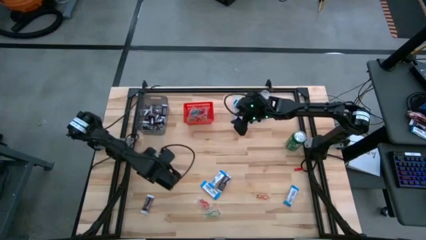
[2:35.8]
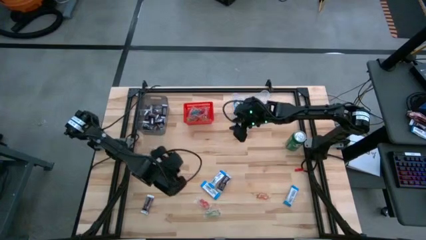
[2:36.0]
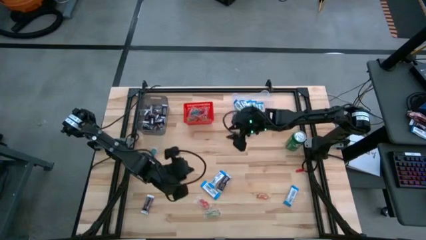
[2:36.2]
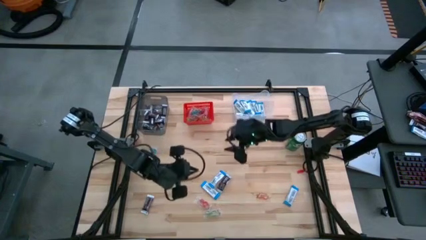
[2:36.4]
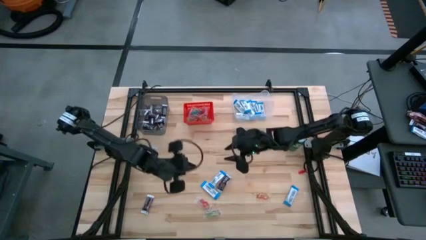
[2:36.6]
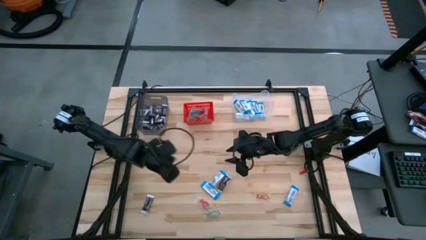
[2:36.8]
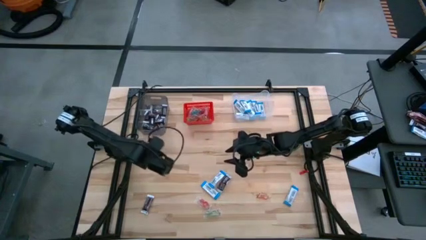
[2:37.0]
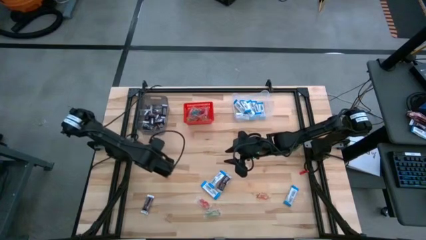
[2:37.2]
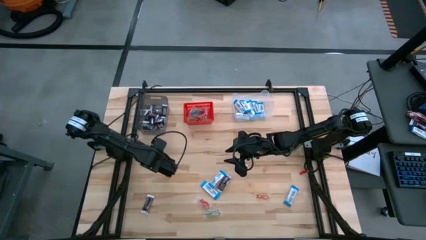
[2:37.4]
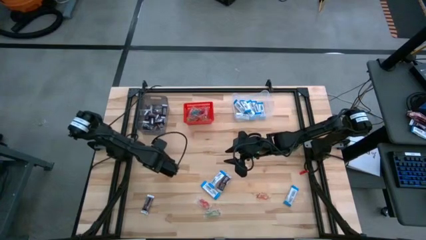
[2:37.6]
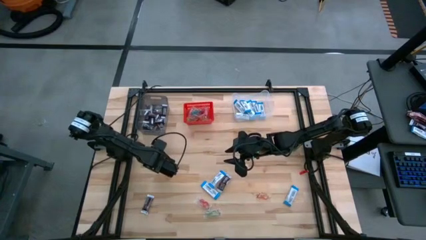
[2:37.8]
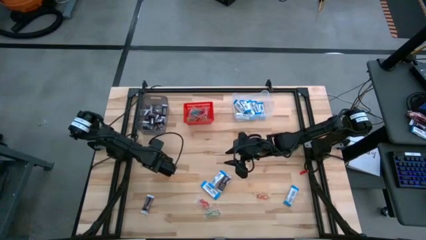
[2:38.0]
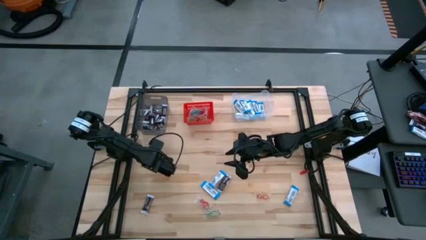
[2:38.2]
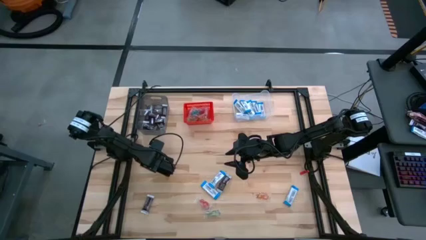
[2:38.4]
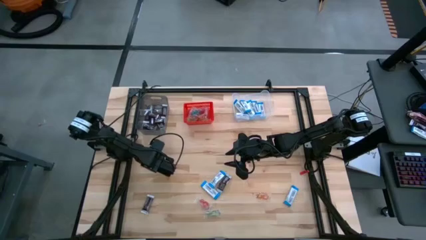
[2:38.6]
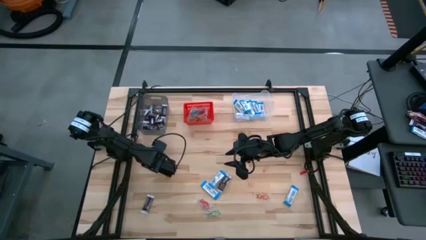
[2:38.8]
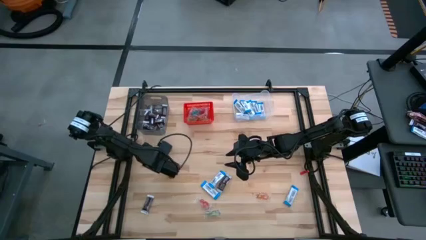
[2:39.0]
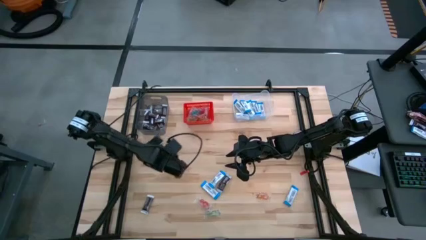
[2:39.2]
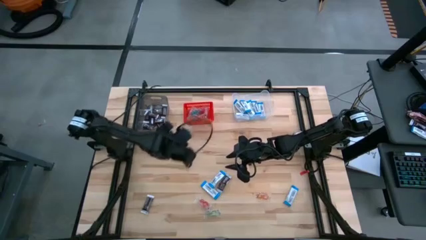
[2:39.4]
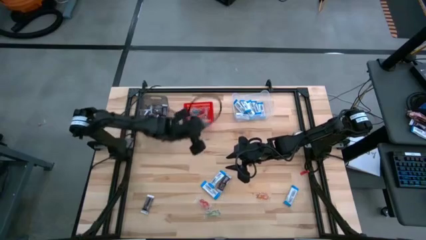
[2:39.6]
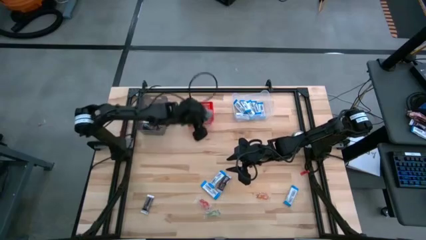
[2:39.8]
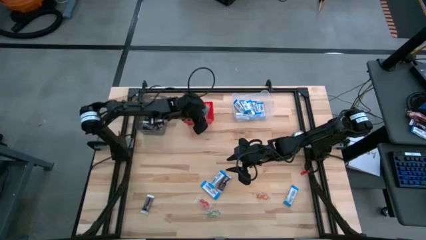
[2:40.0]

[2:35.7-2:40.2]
Task: Sort candy
Put the blue gummy into the red bin

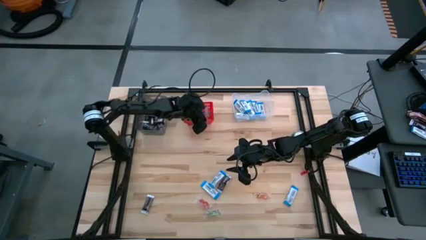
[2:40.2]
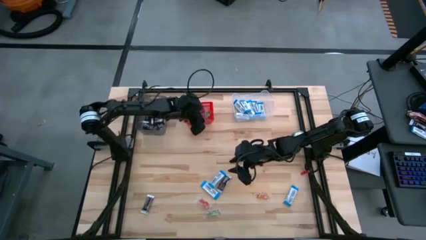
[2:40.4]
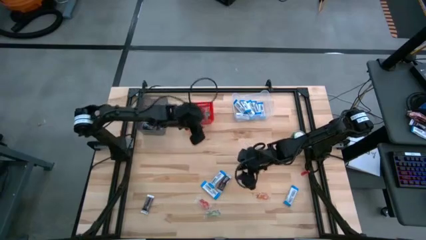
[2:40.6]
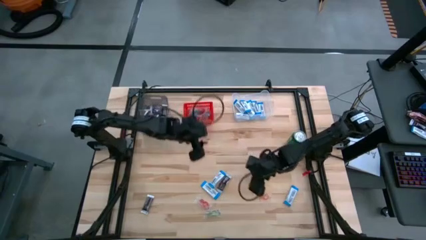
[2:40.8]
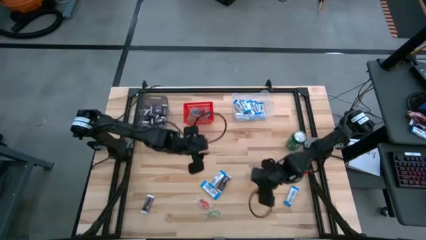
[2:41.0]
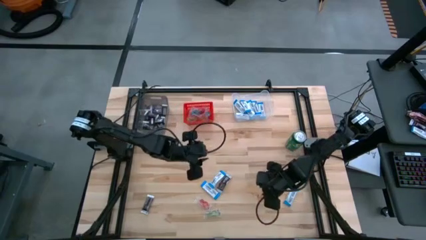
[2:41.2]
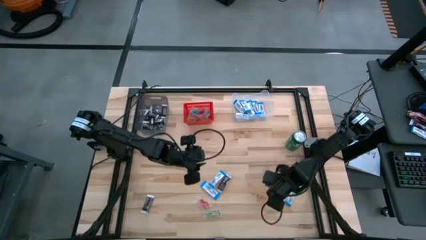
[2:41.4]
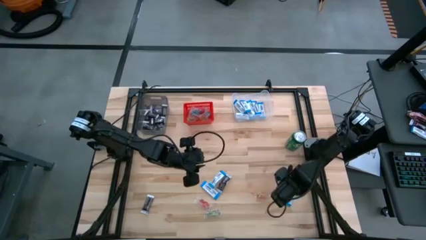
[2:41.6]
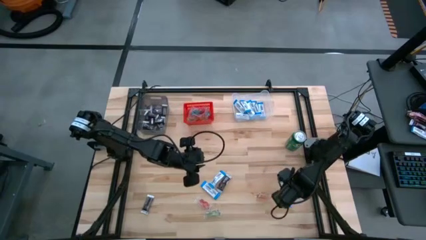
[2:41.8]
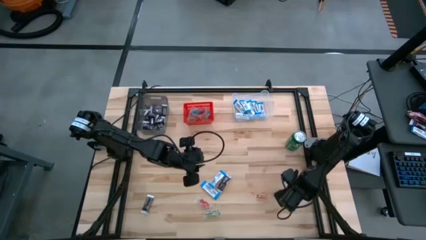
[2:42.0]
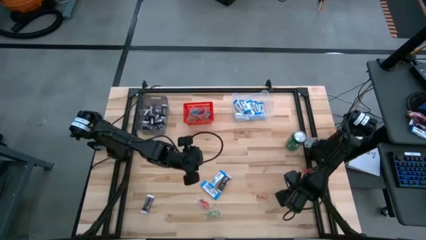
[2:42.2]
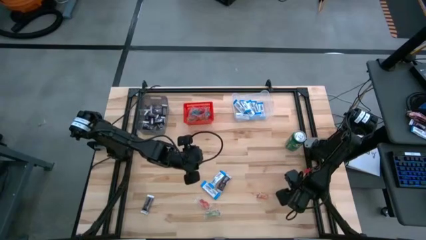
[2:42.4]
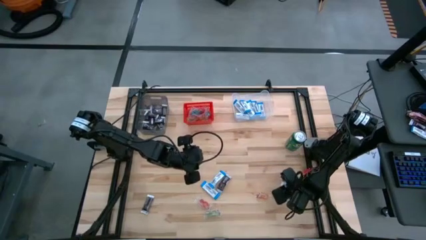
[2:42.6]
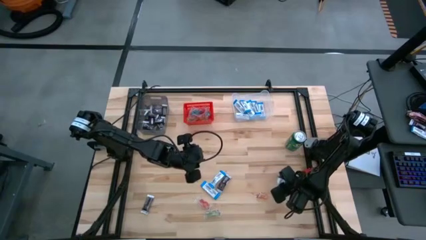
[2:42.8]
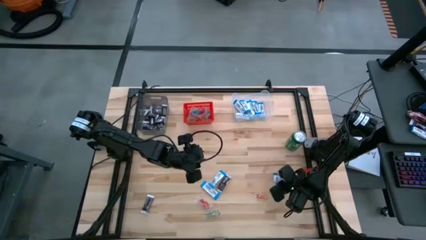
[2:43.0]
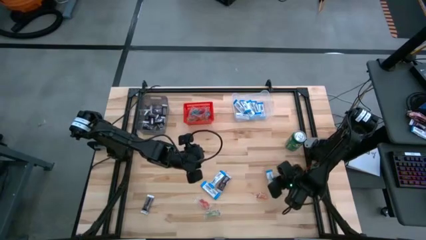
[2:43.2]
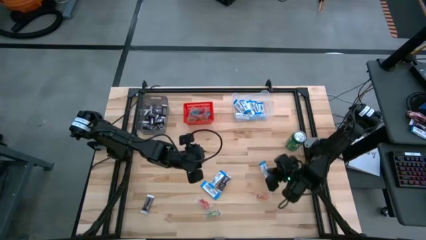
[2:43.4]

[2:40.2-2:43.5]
Put the white chocolate into the transparent bin

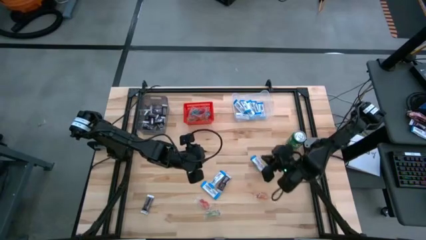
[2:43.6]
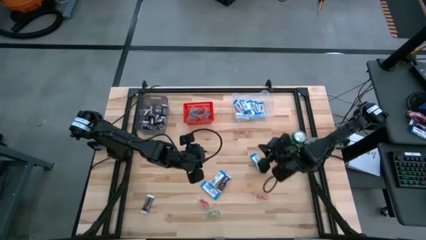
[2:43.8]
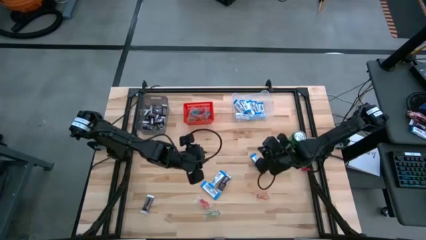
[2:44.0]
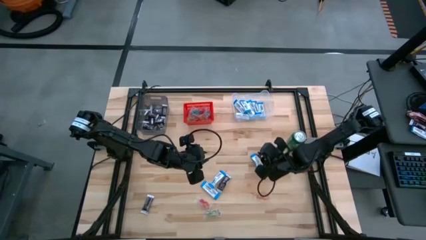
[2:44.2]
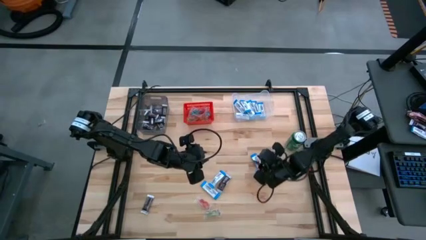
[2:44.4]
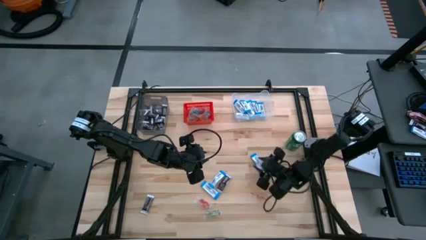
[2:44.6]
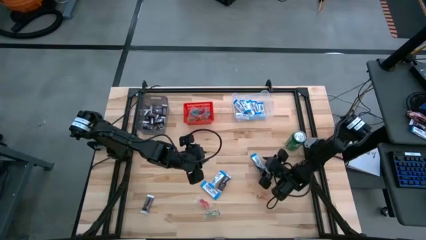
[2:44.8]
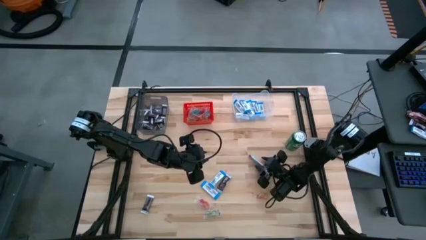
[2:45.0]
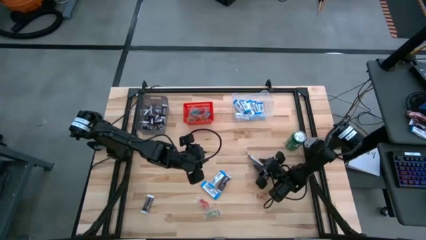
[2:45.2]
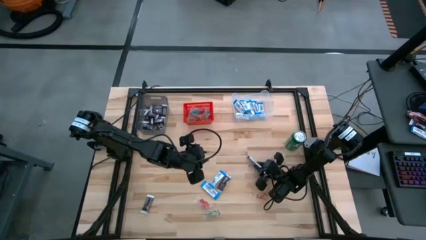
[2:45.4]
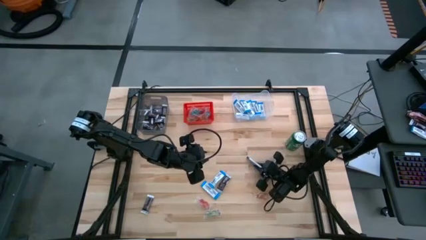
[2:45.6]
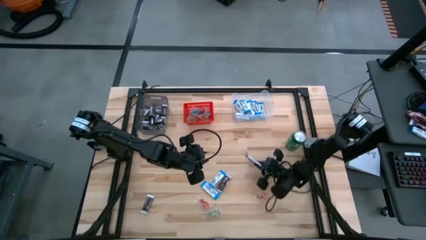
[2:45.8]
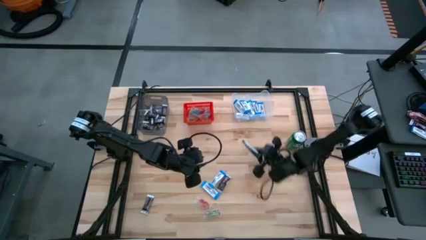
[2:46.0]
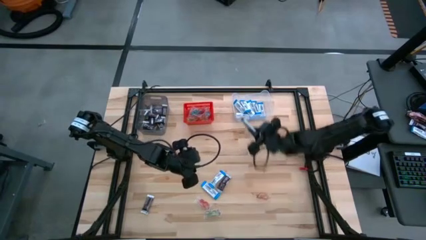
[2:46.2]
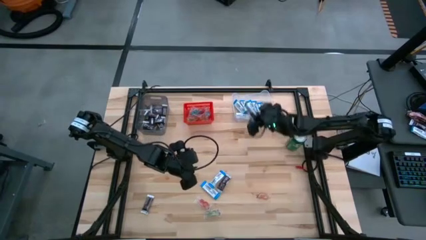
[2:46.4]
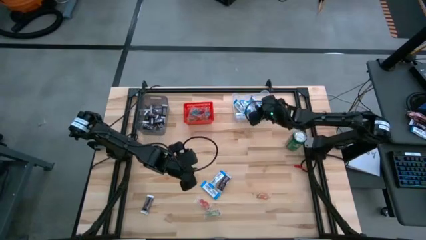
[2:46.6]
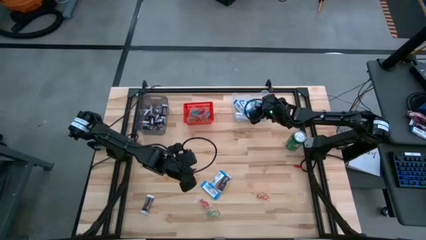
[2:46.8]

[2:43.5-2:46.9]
Put the white chocolate into the transparent bin

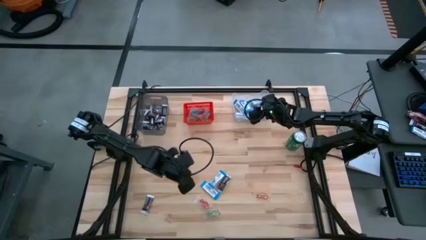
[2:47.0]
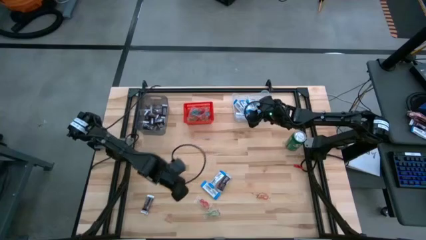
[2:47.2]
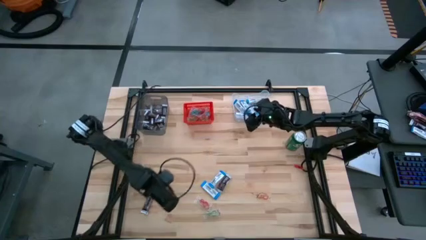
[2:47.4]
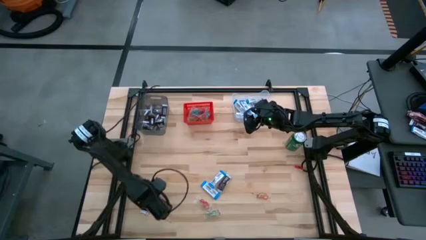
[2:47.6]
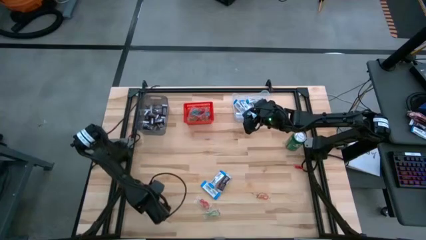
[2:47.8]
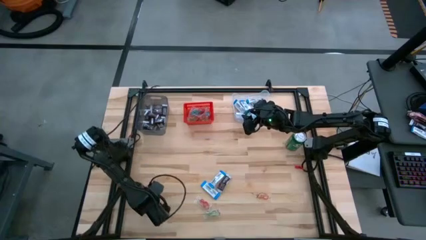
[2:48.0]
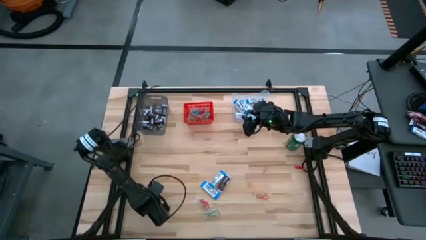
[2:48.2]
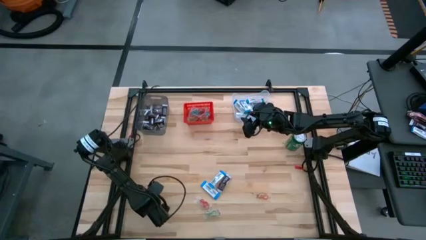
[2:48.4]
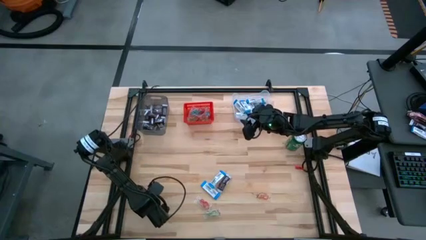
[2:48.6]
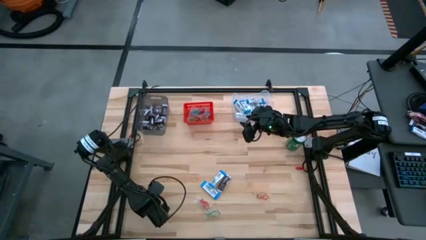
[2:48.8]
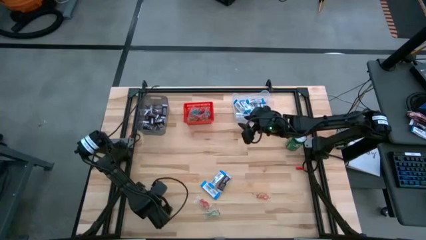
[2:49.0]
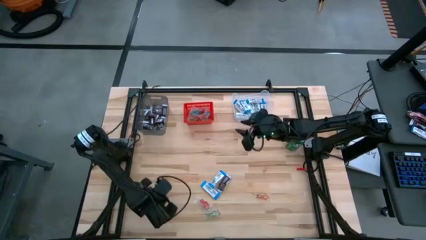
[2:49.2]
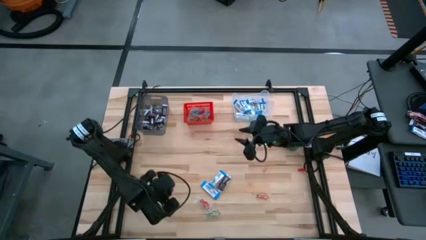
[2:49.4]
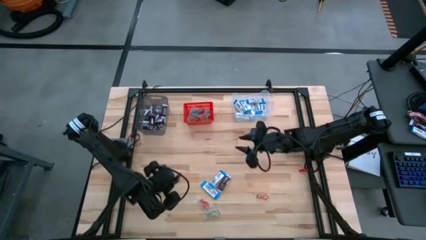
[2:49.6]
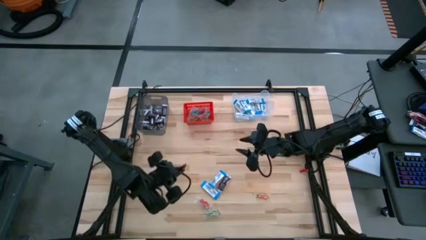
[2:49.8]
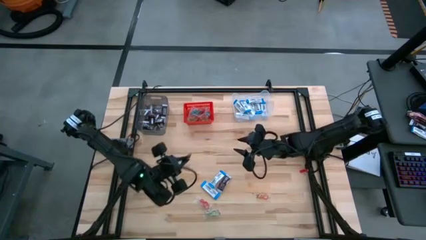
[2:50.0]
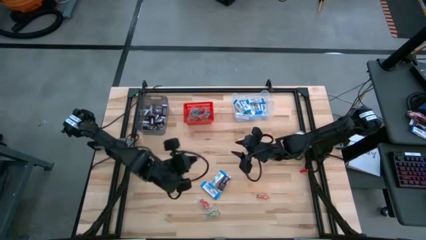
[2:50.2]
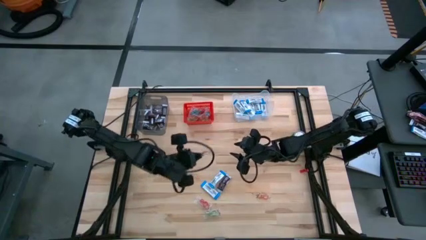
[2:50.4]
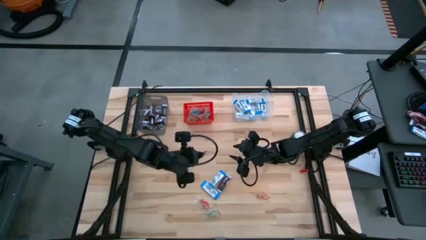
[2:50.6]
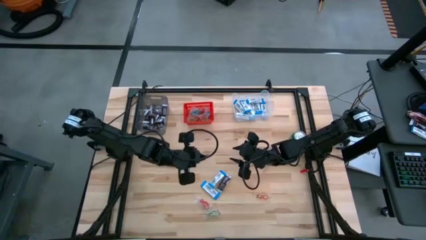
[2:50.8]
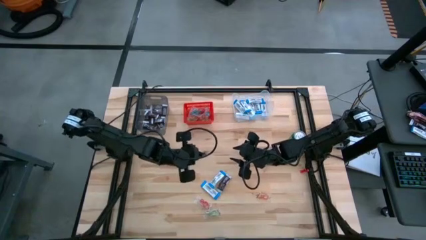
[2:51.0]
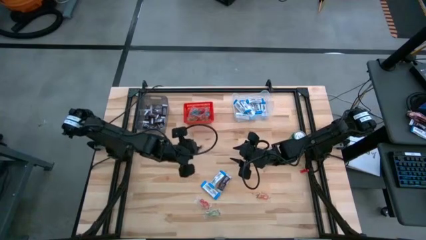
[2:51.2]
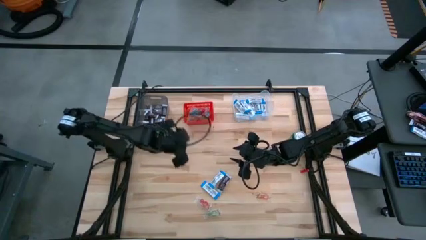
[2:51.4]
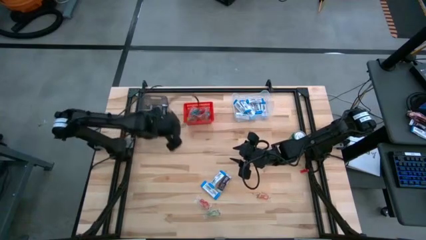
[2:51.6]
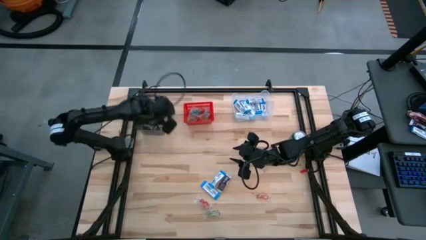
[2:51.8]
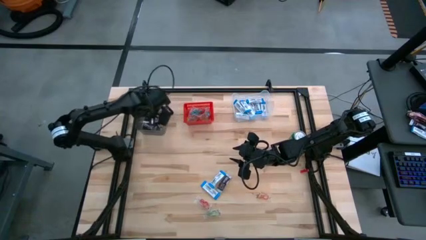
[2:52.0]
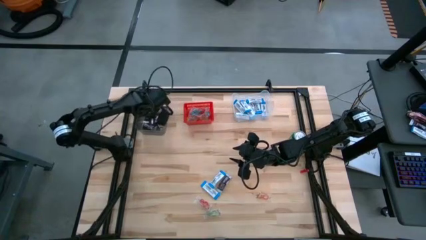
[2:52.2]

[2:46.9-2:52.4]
Put the brown chocolate into the black bin

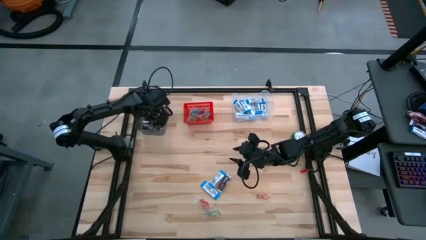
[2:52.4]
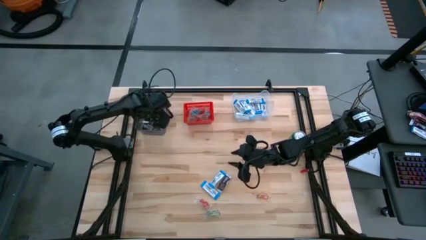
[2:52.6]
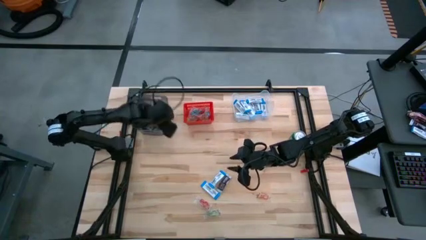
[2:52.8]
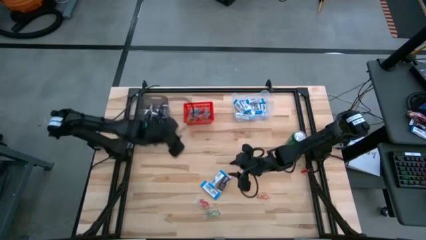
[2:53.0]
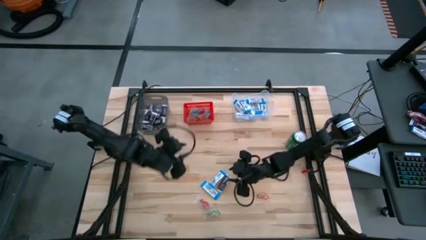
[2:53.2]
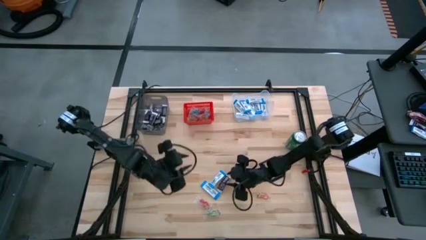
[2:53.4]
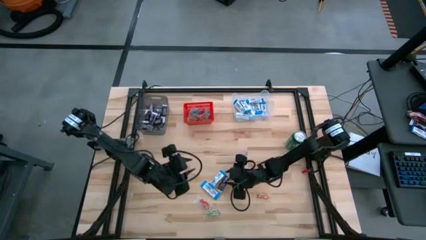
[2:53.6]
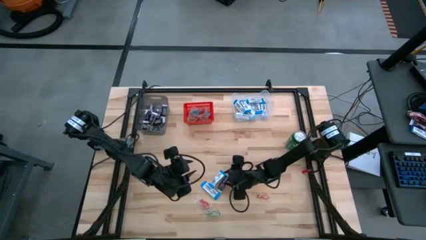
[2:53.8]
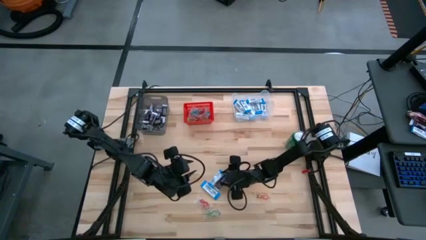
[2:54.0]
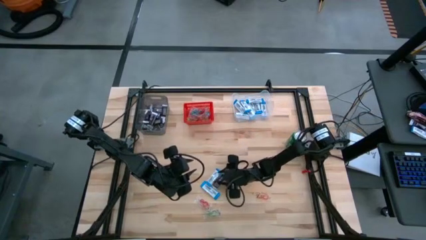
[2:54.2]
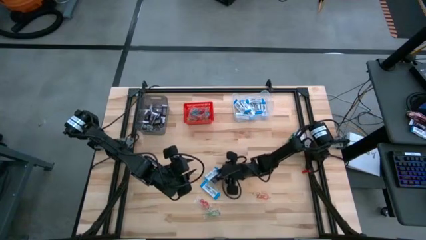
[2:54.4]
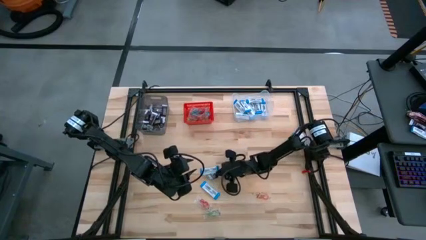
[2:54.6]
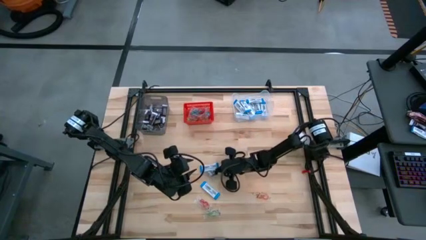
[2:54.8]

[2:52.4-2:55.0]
Put the white chocolate into the transparent bin
